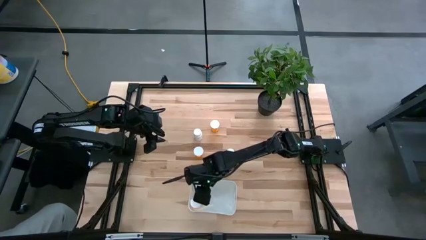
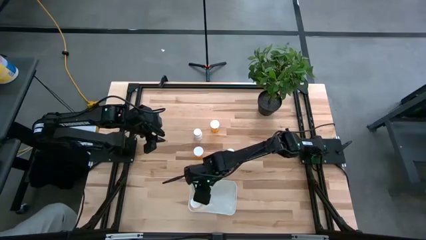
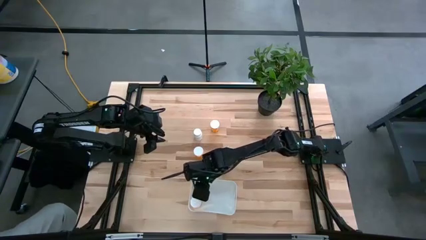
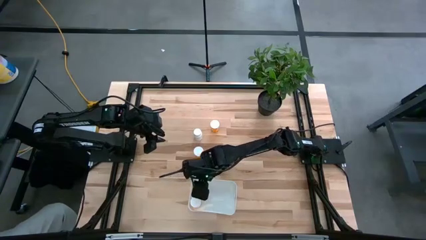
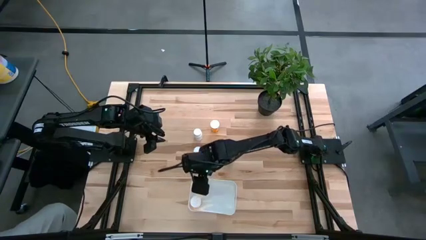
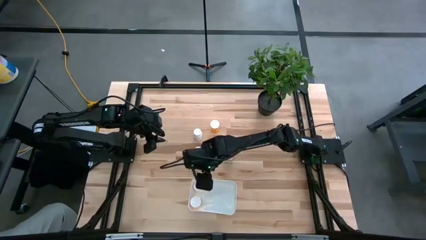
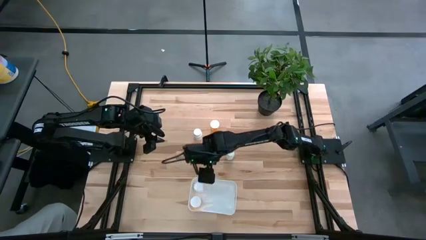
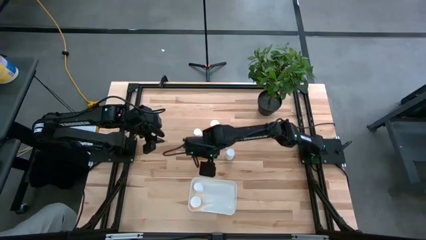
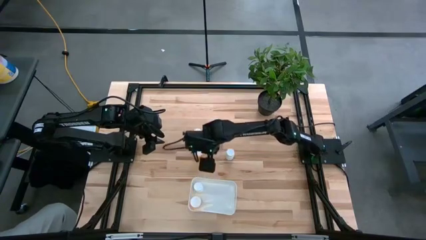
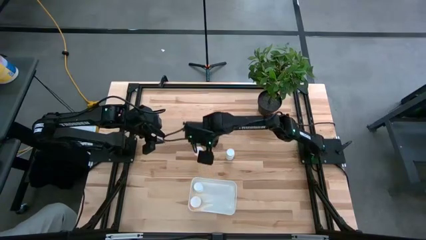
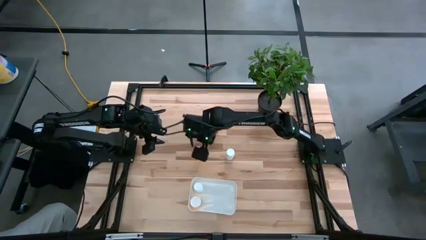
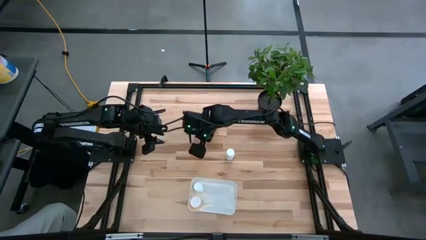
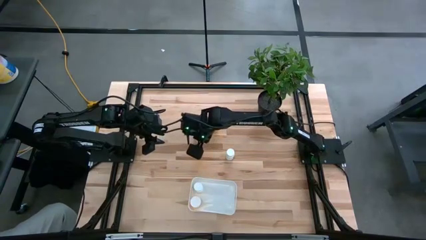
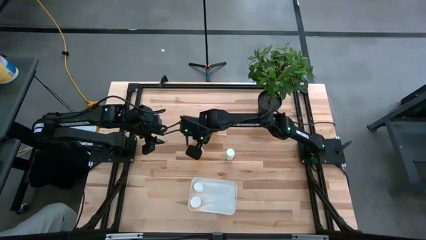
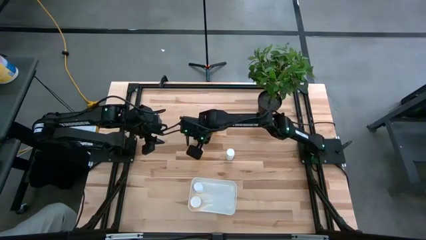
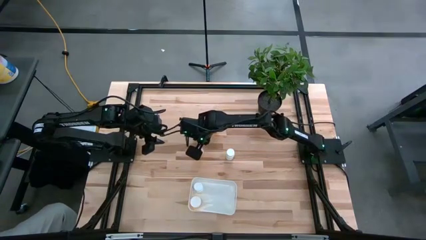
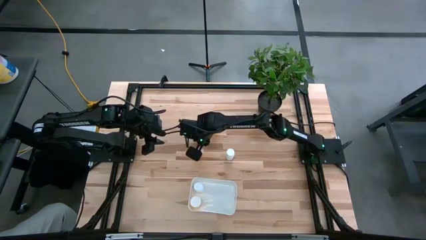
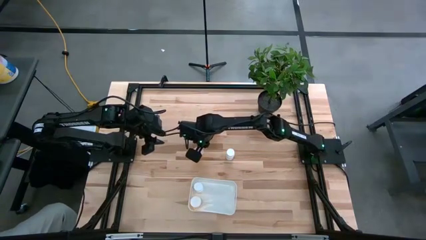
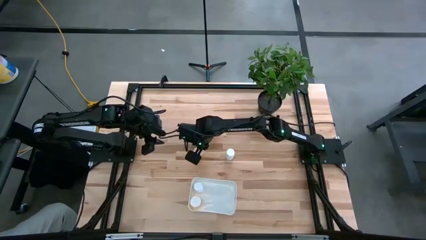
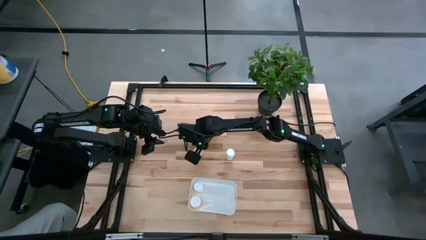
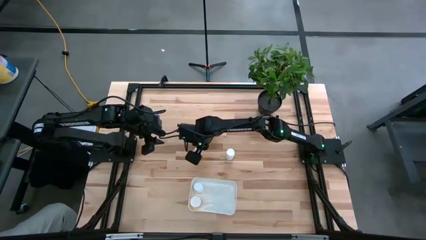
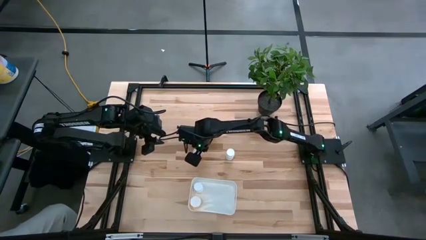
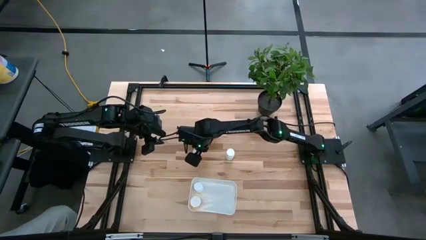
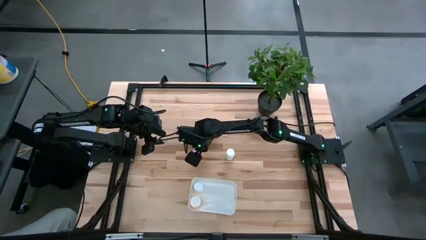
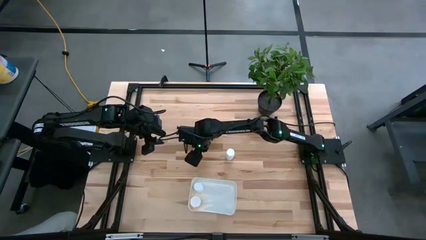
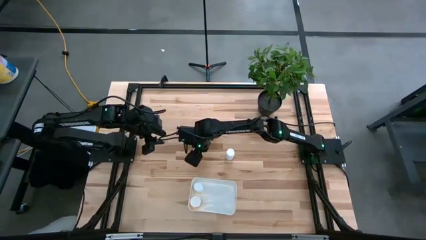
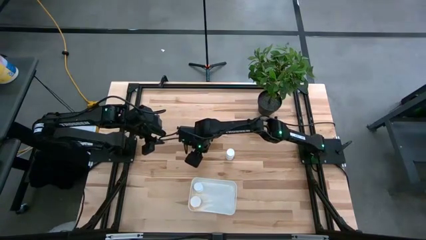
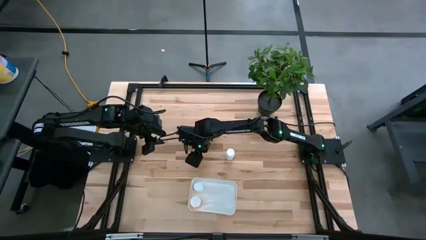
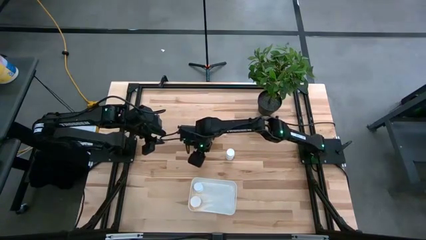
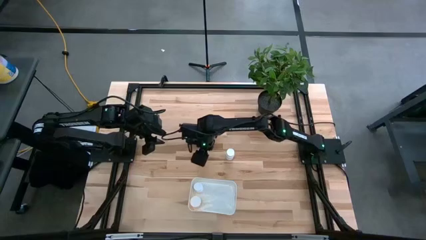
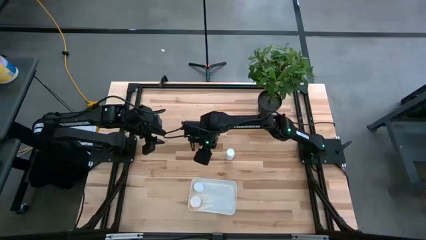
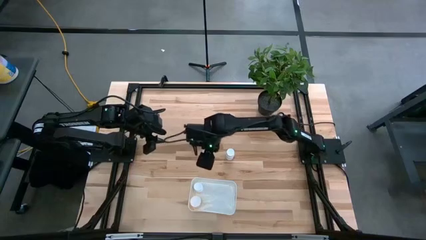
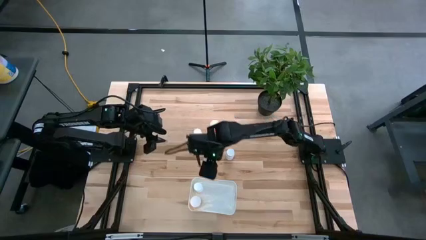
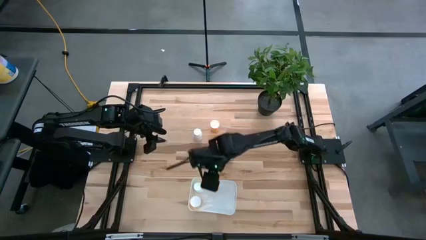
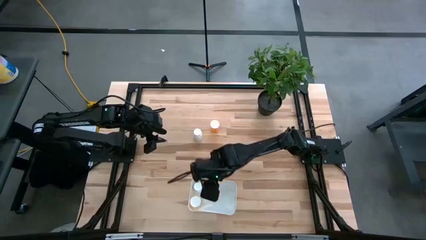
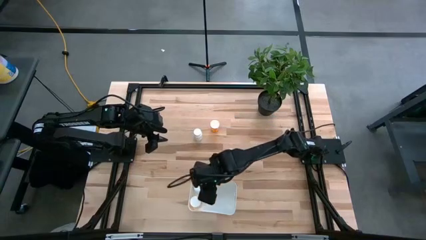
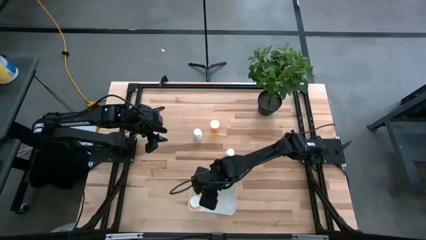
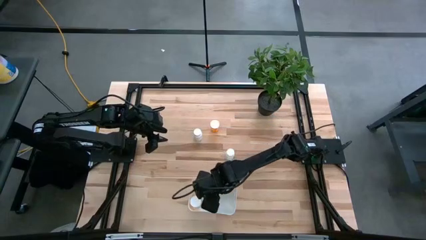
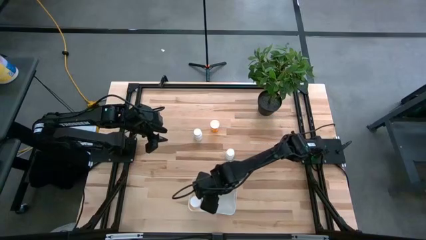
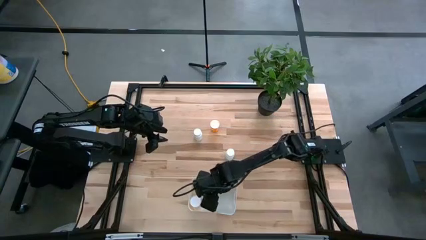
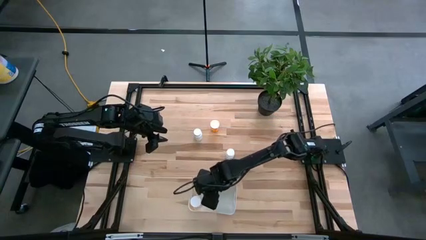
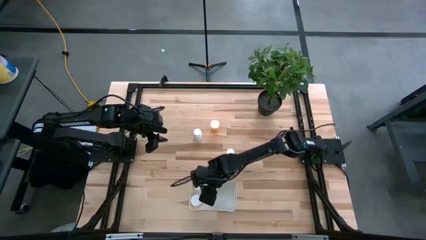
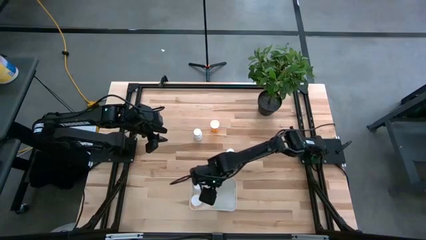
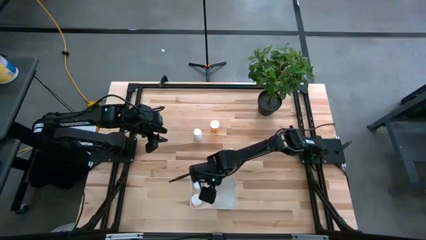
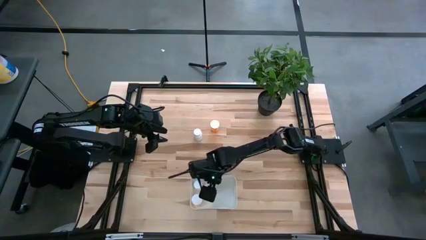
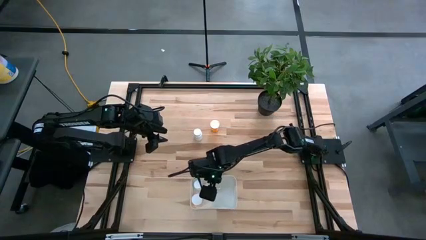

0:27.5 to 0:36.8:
Task: Pick and place pill bottles into a basket
Put the bottom orange pill bottle in the white bin

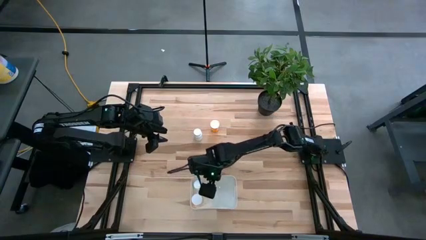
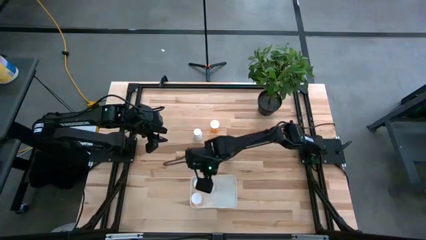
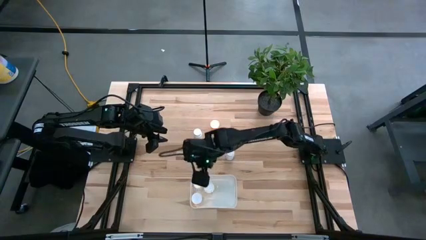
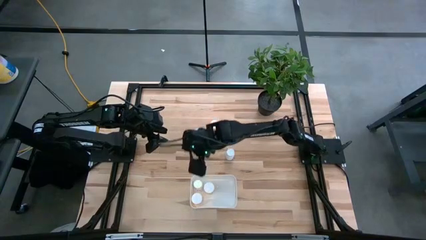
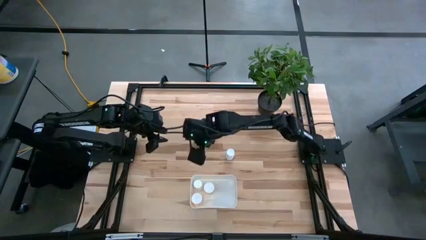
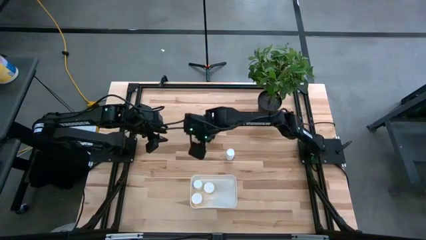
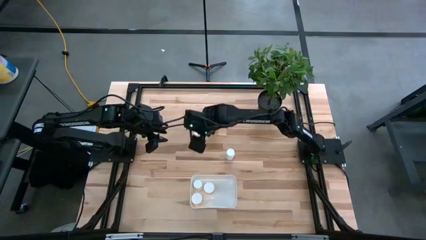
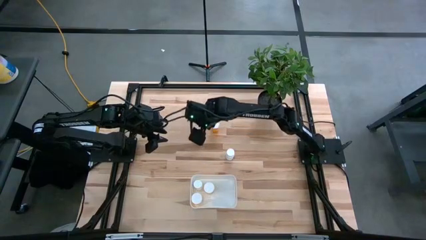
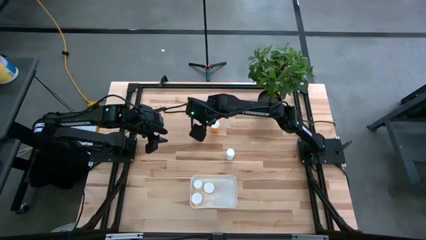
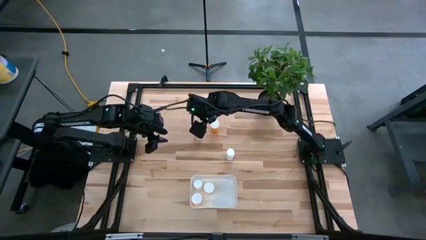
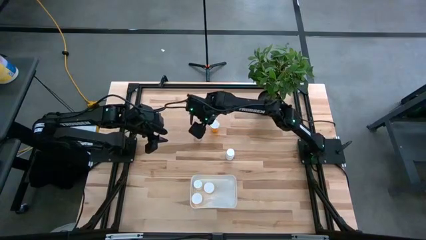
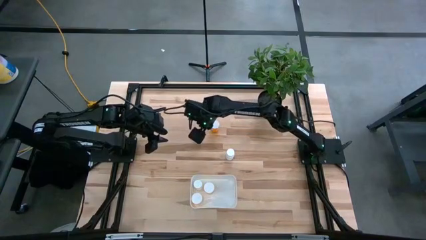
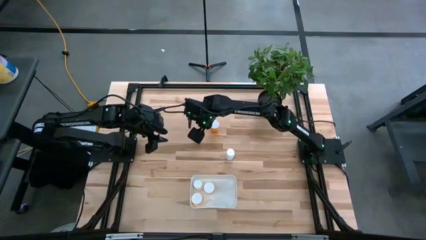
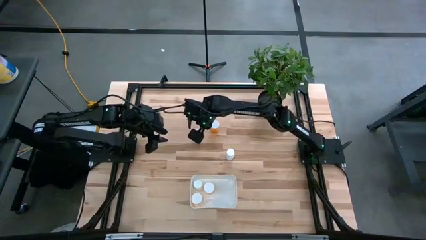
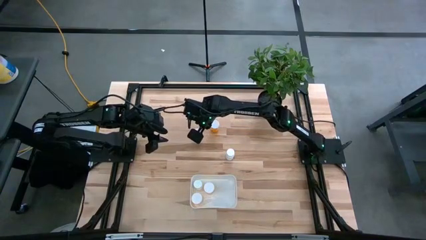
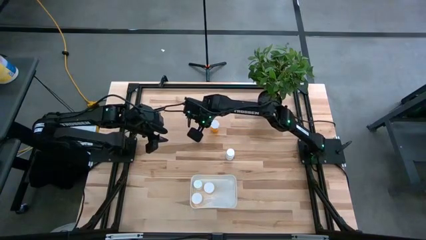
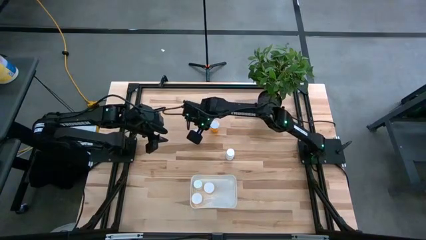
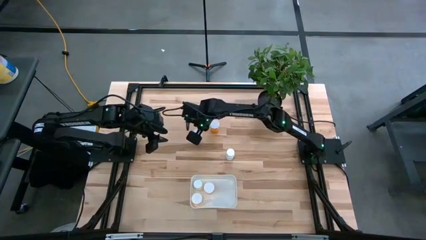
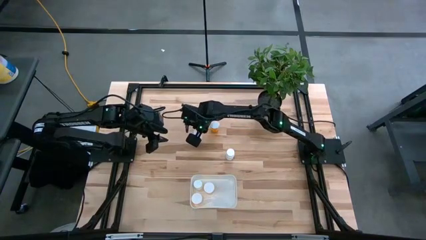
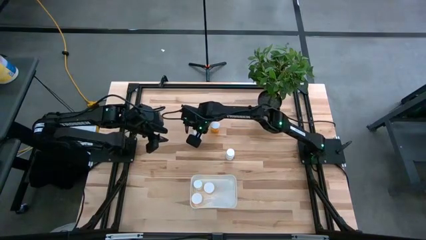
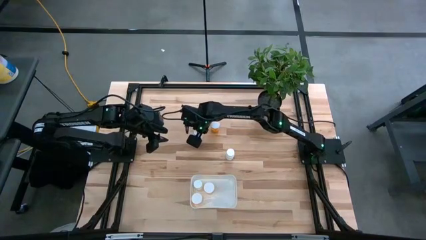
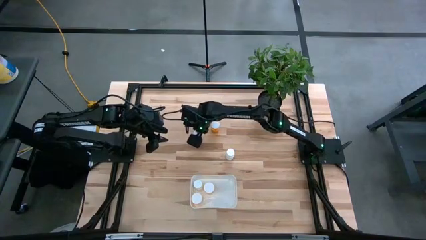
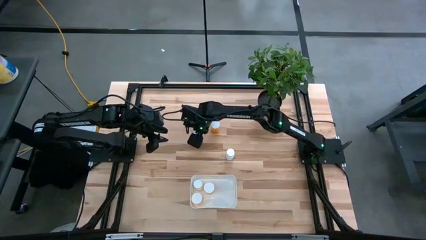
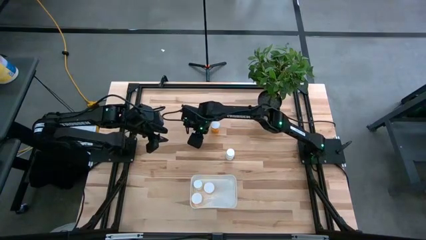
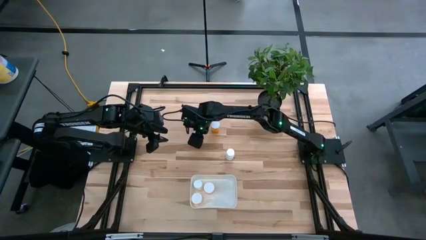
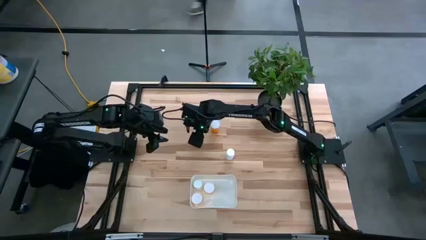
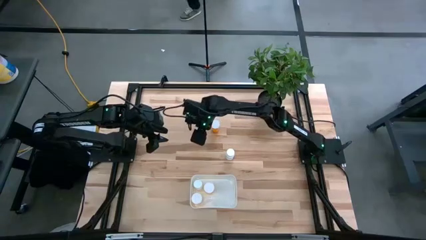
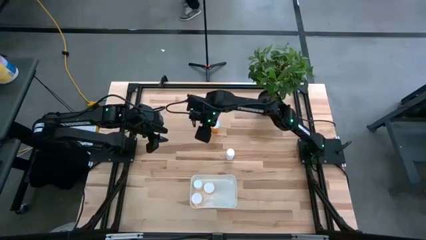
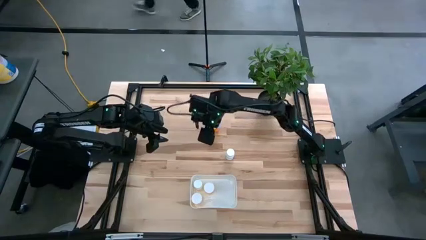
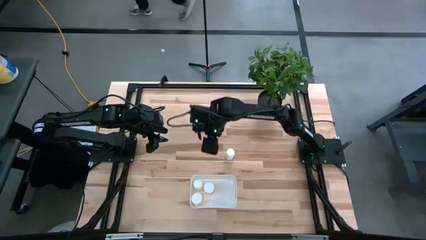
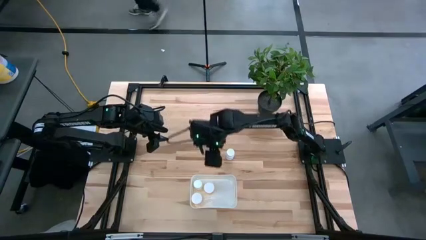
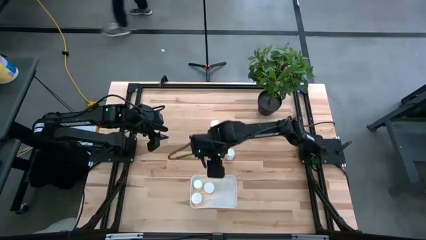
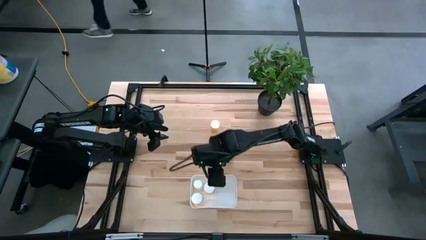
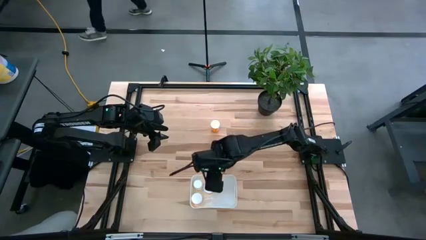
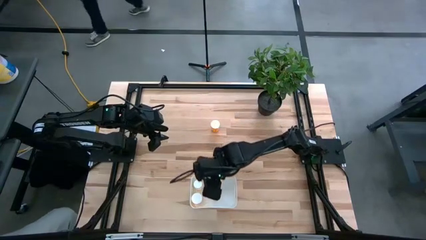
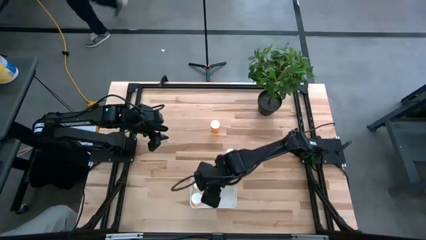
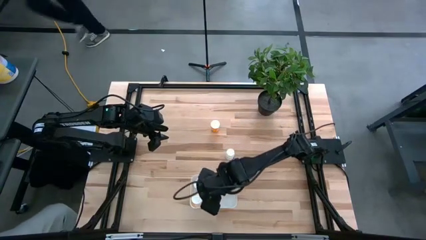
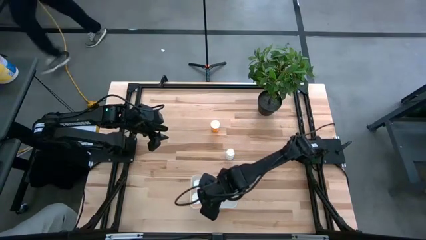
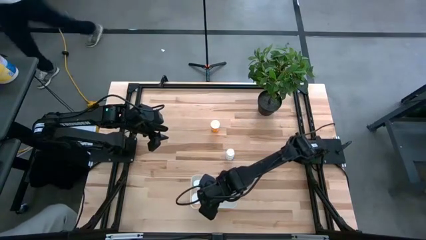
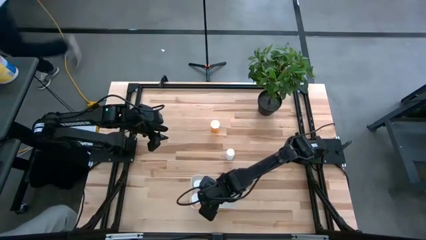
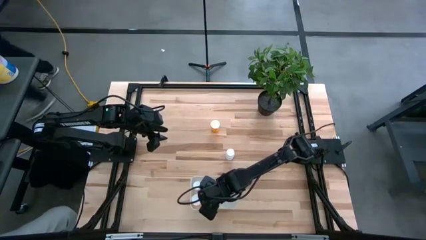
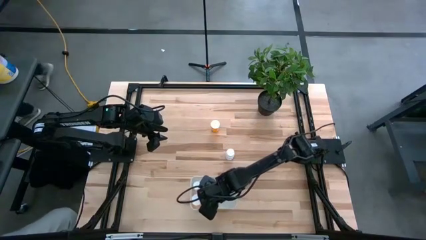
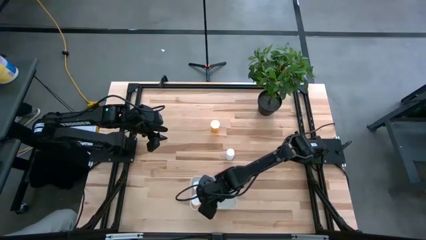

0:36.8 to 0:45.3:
Put the left white pill bottle in the white bin
